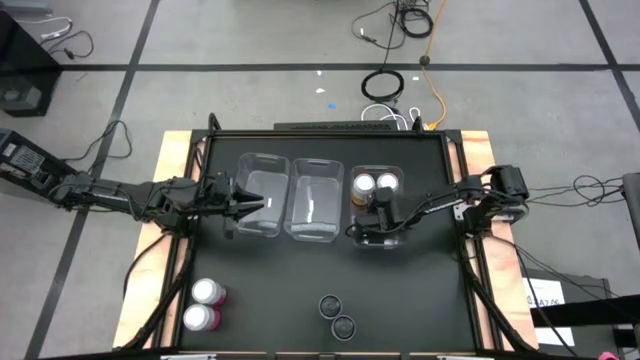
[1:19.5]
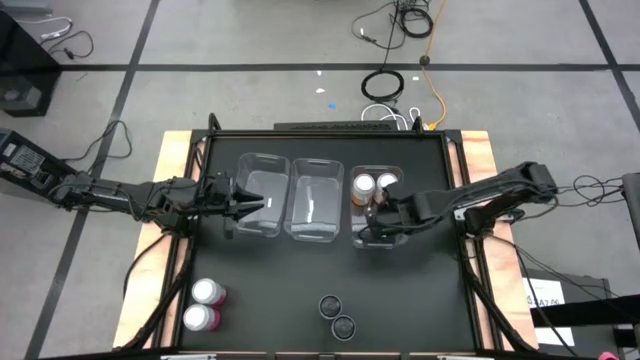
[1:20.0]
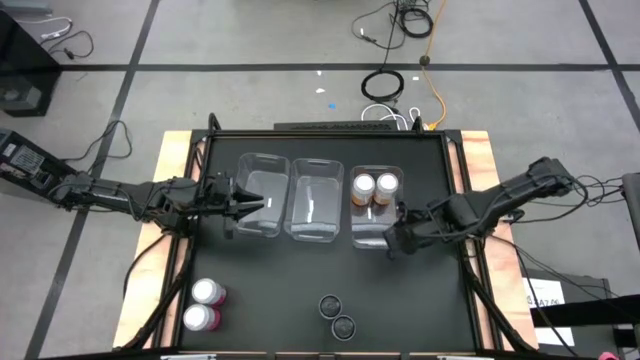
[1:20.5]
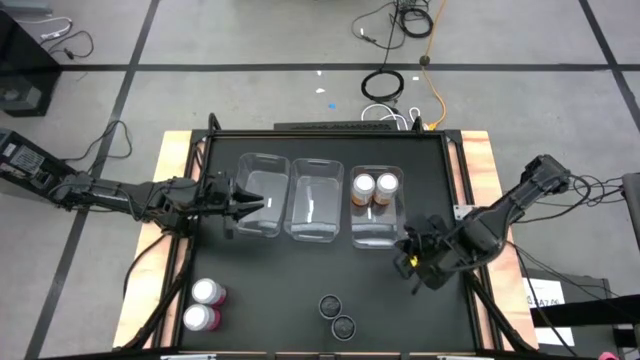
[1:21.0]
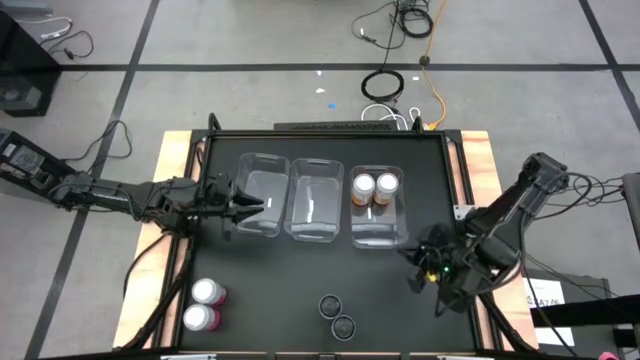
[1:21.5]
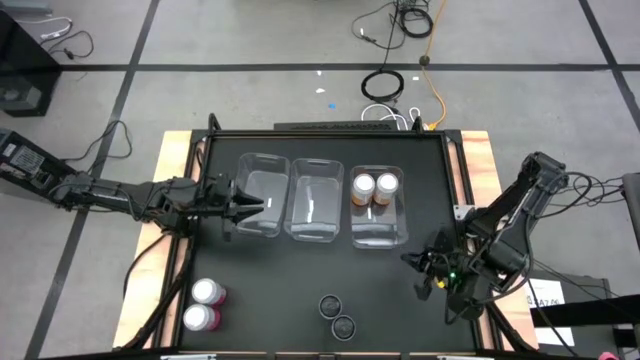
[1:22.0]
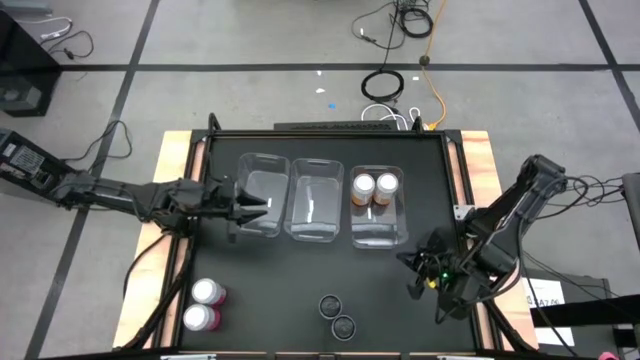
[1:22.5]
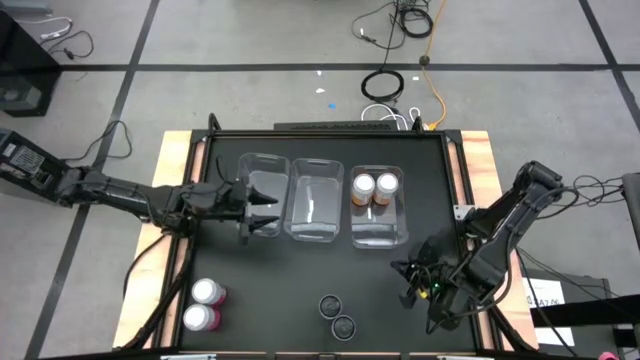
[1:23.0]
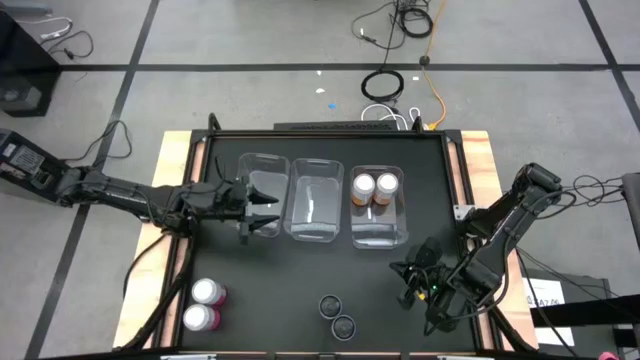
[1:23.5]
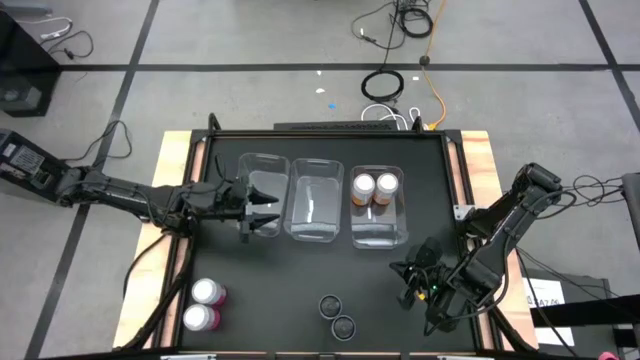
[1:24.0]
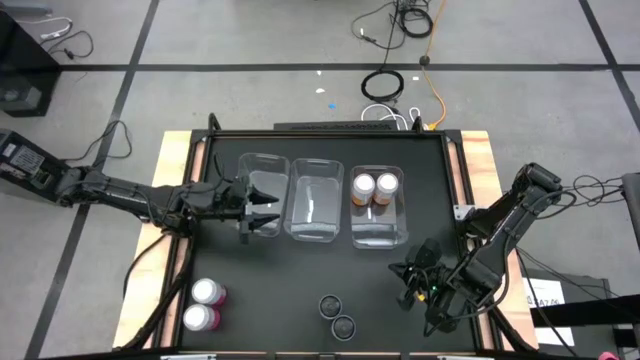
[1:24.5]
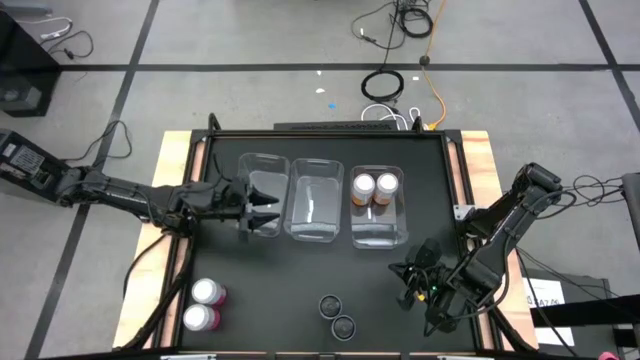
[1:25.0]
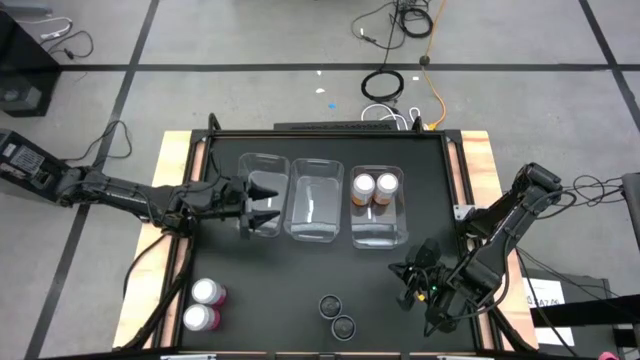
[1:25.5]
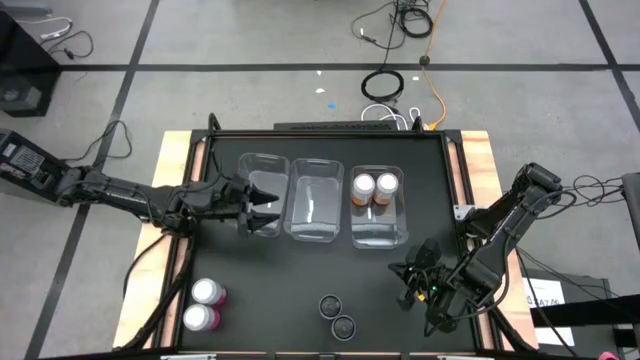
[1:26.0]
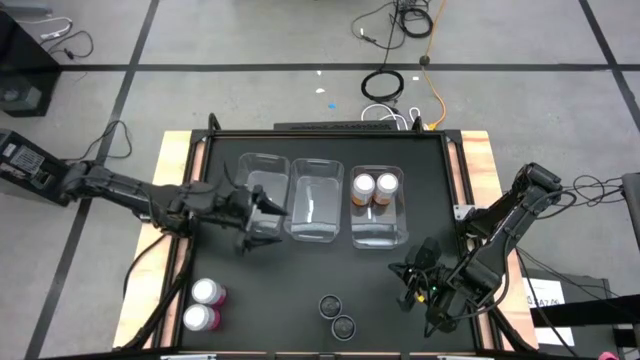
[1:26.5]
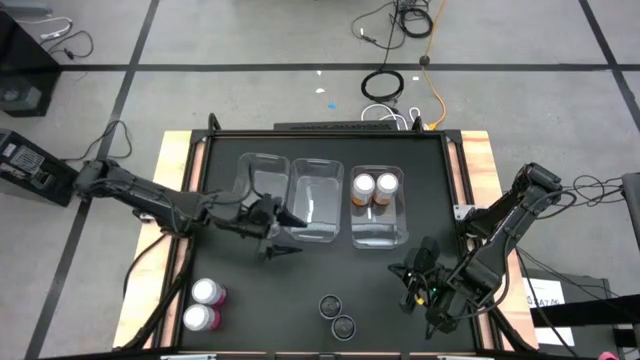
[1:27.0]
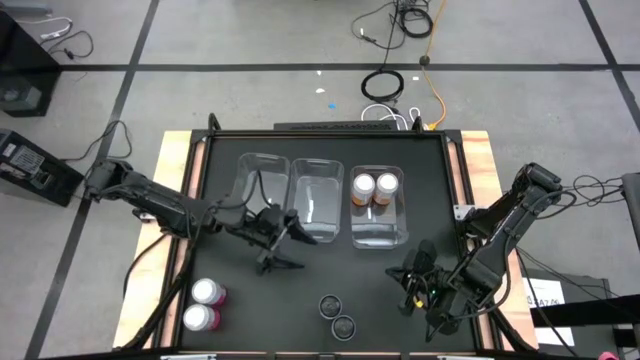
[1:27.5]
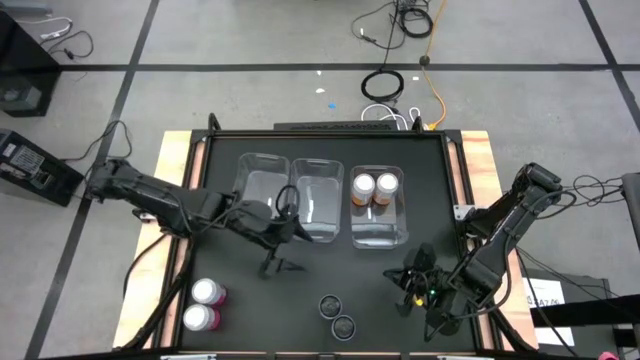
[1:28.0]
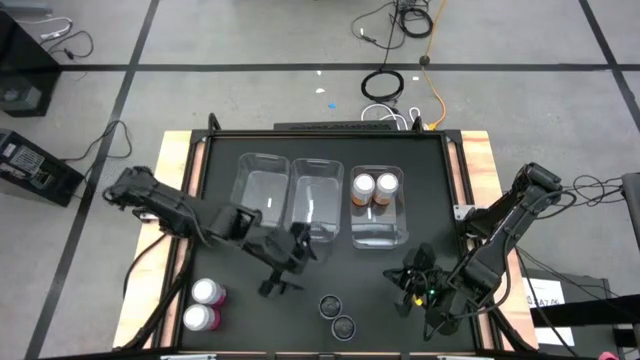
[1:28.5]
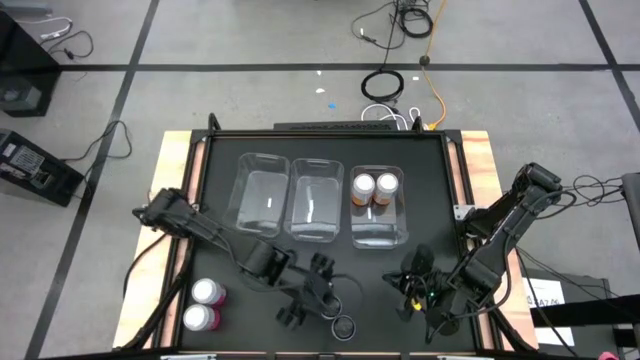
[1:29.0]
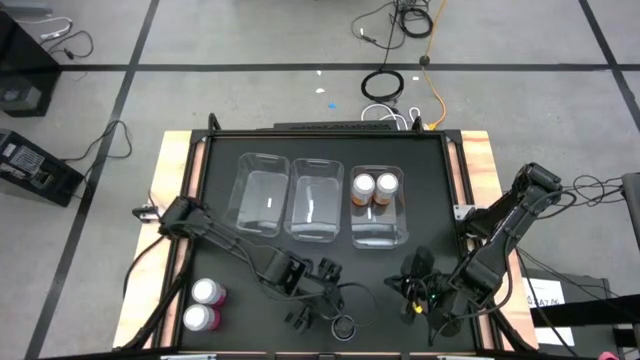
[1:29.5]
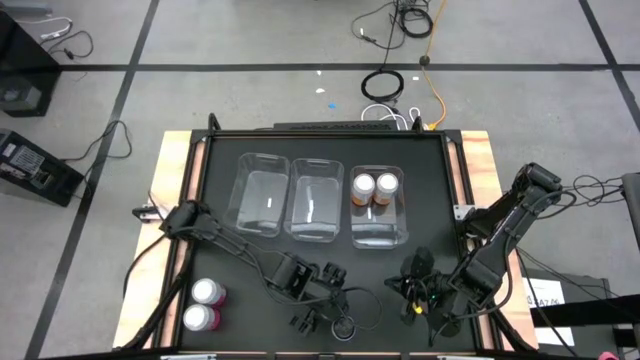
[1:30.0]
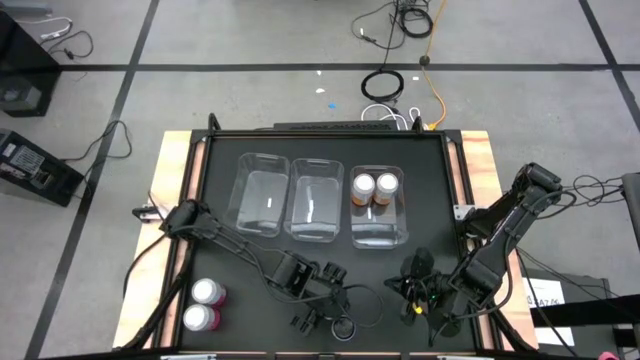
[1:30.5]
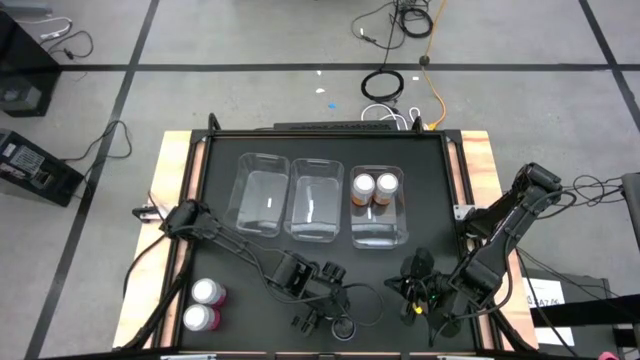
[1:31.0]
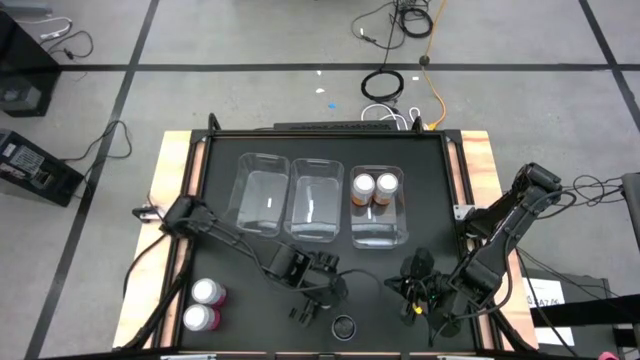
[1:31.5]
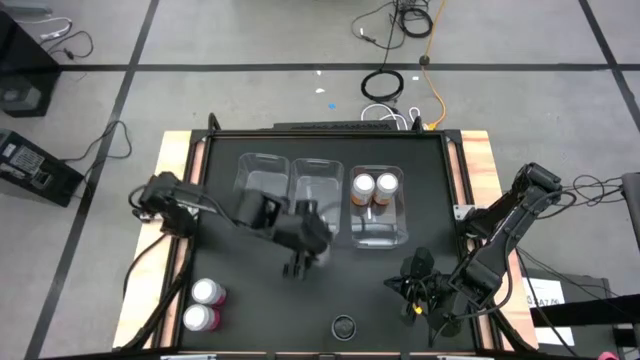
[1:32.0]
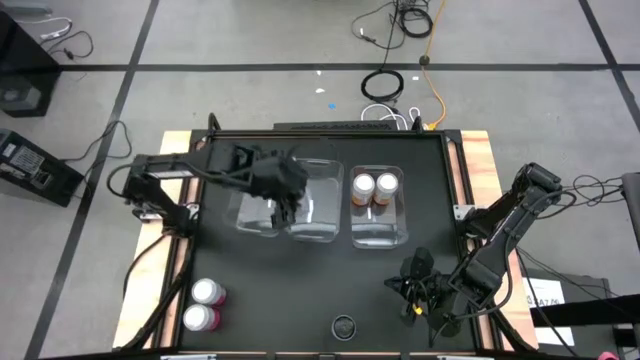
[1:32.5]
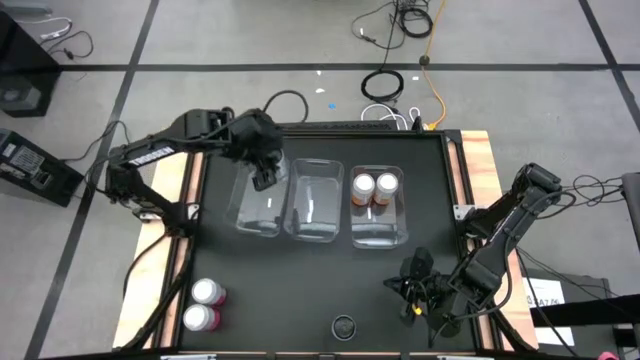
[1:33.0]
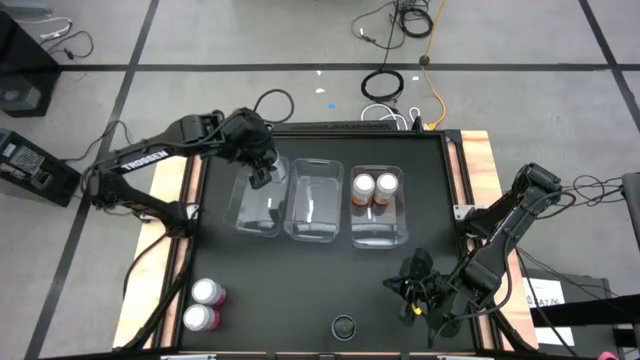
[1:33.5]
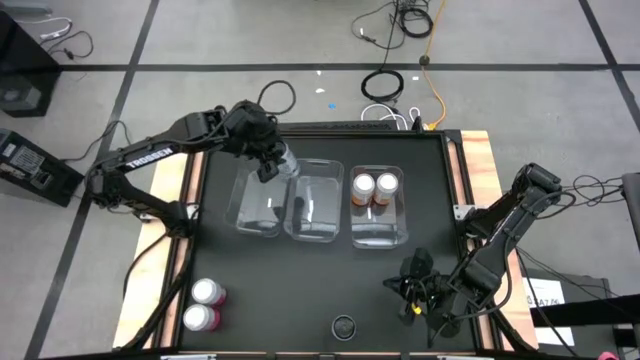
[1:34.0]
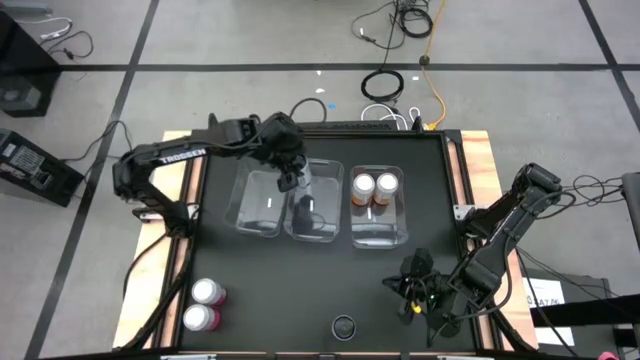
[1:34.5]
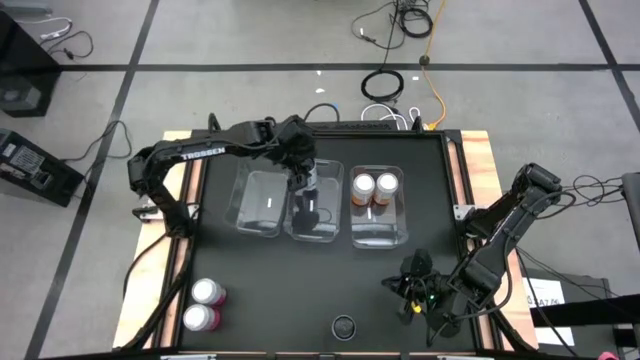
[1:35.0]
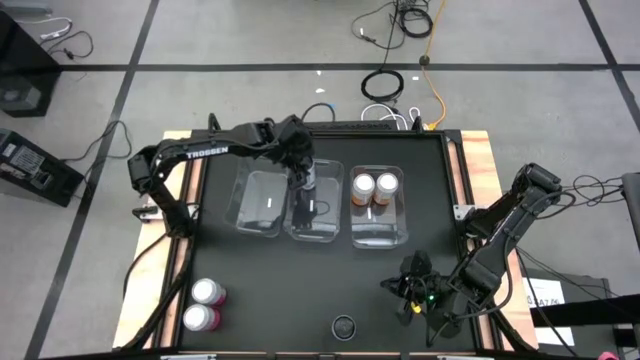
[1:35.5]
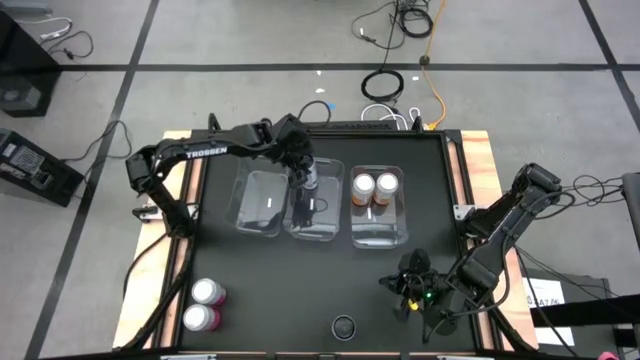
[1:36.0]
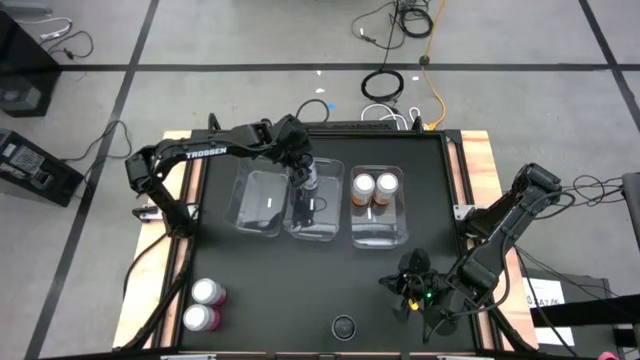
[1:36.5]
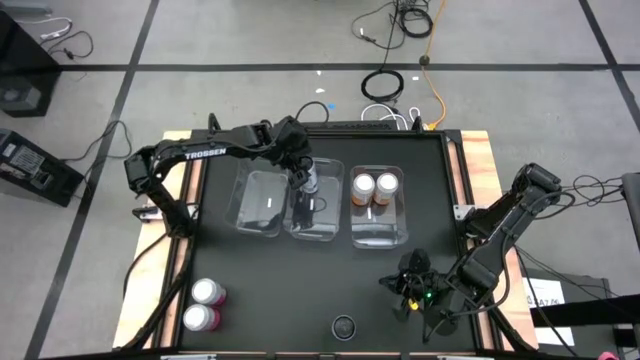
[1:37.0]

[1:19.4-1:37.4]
Task: Sort soda cans
Put the top white-blue soda can into the middle transparent bin

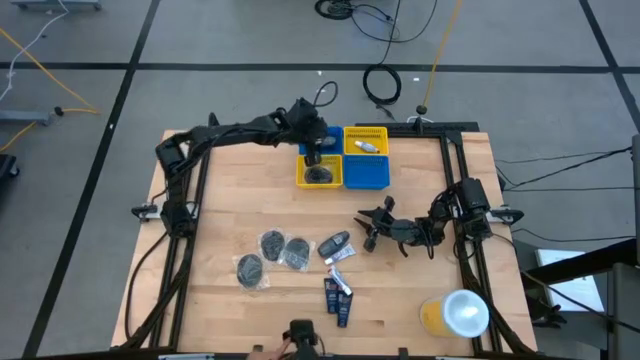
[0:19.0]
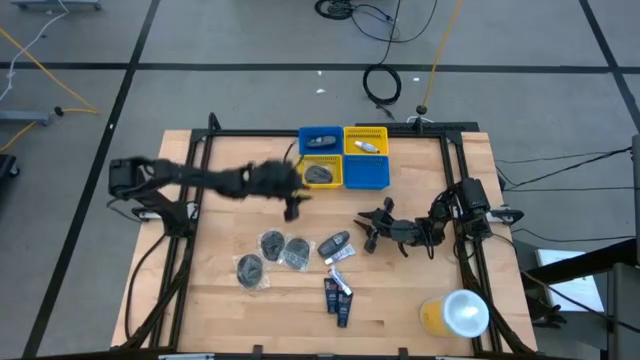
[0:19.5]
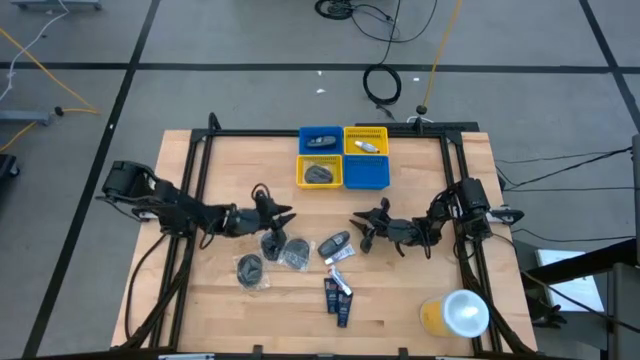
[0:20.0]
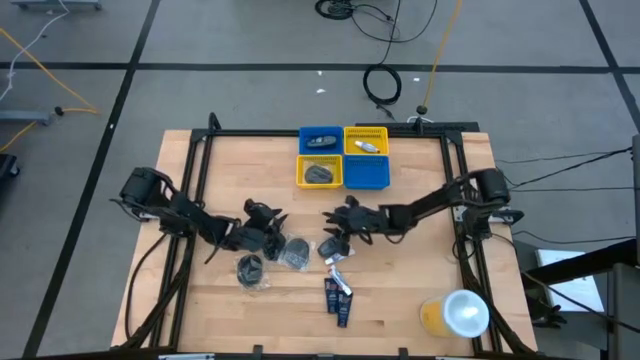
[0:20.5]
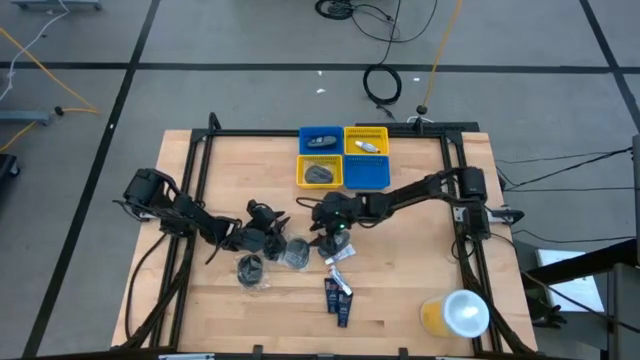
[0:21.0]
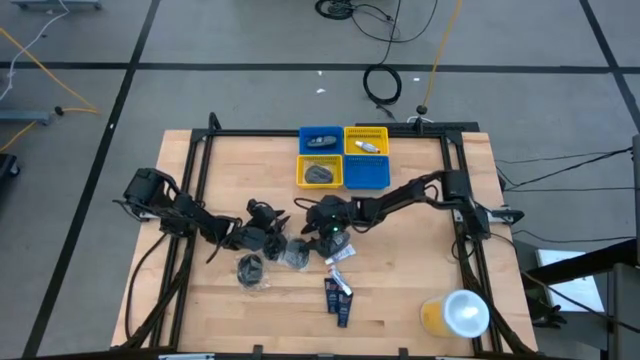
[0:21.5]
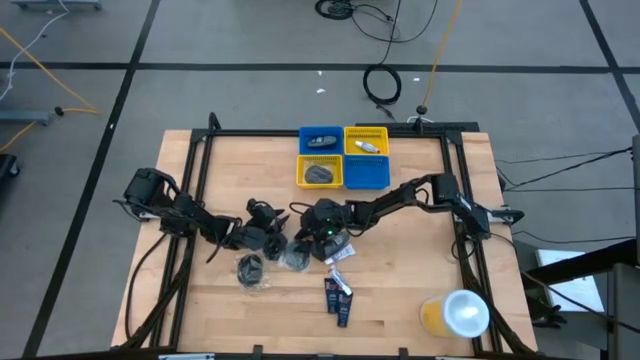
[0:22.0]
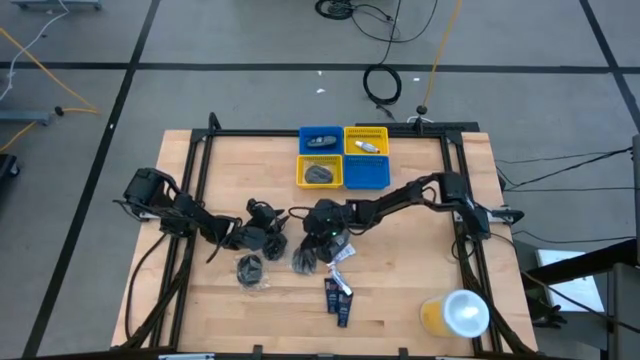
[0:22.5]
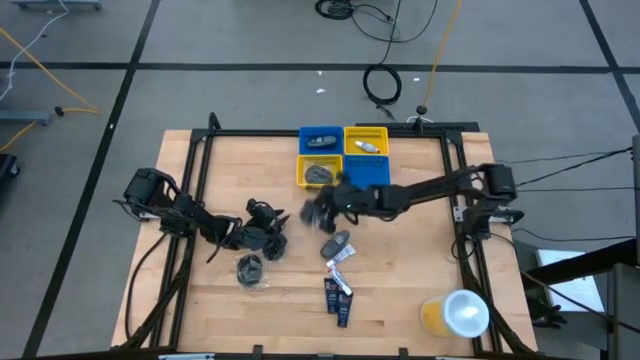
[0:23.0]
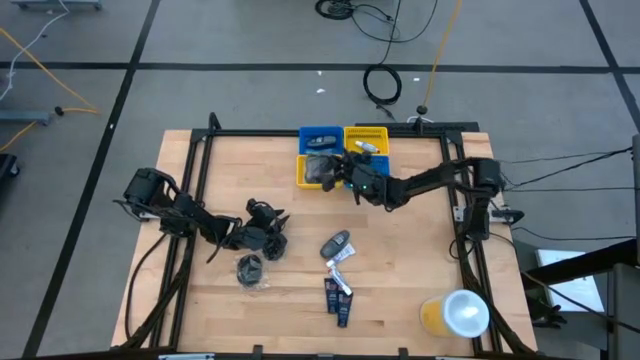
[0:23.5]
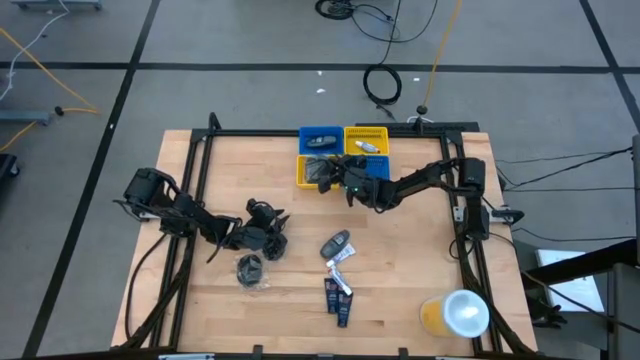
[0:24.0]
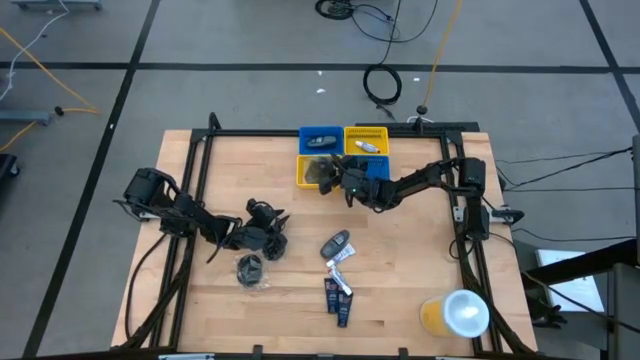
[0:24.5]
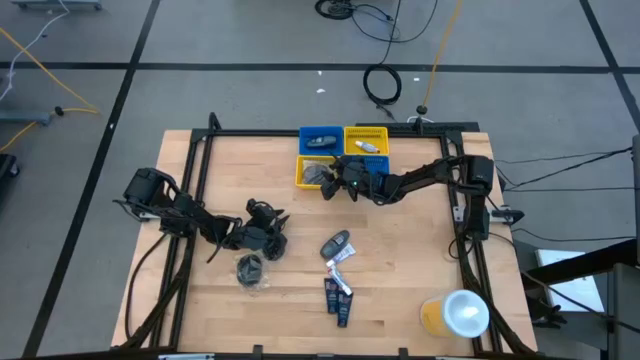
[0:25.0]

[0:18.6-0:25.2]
Task: Pick & Place Travel size toiletries
Put the black hairbrush into the left yellow bin
